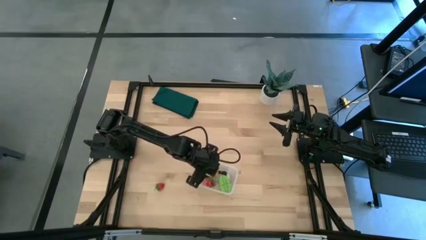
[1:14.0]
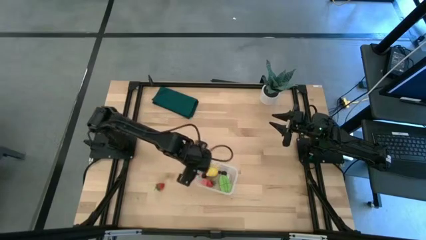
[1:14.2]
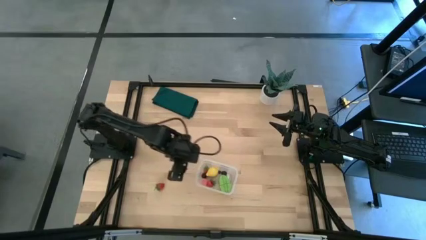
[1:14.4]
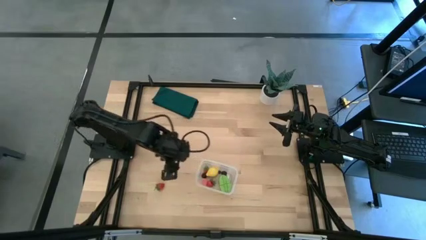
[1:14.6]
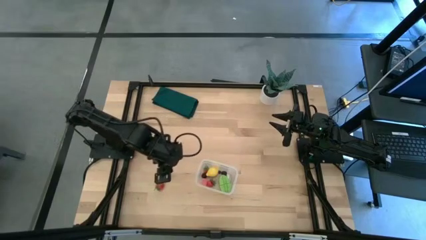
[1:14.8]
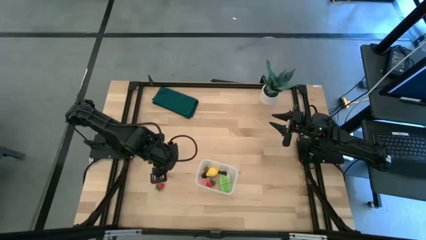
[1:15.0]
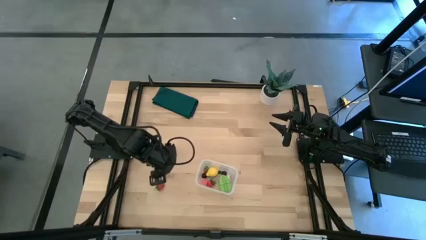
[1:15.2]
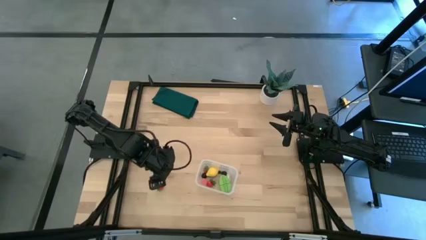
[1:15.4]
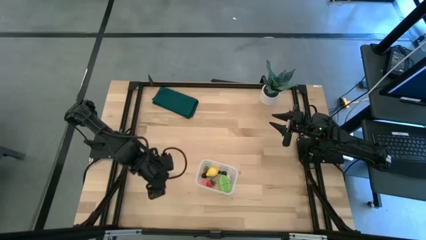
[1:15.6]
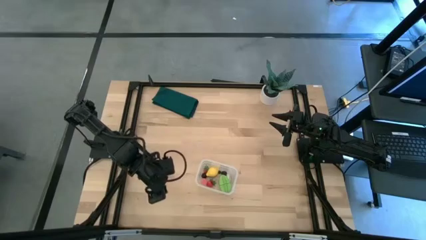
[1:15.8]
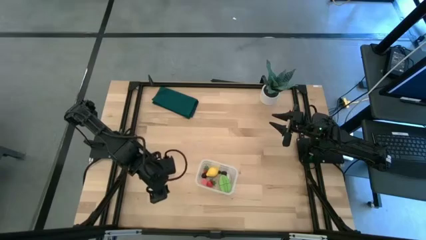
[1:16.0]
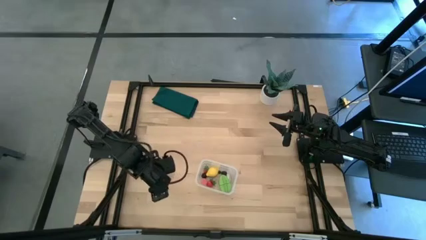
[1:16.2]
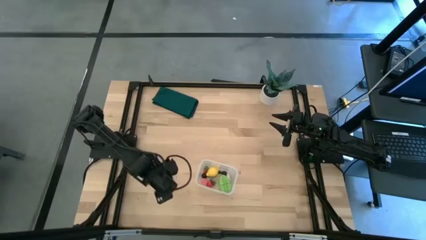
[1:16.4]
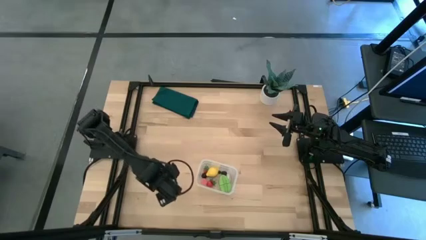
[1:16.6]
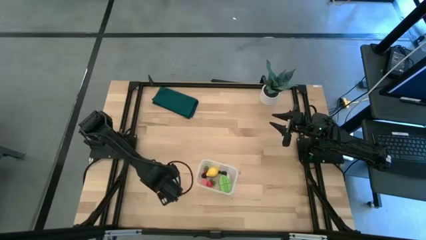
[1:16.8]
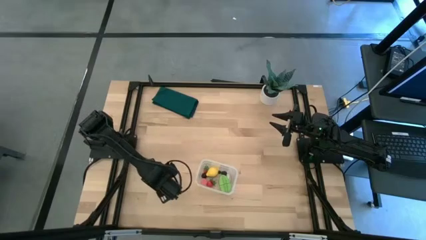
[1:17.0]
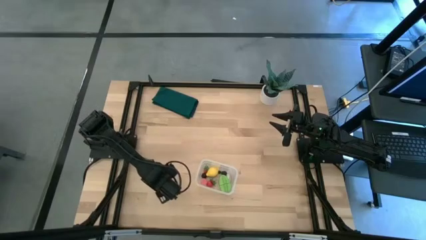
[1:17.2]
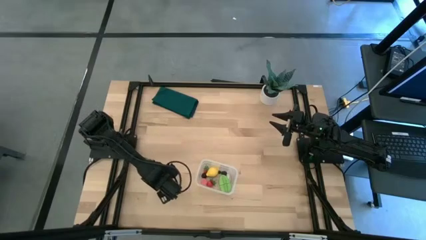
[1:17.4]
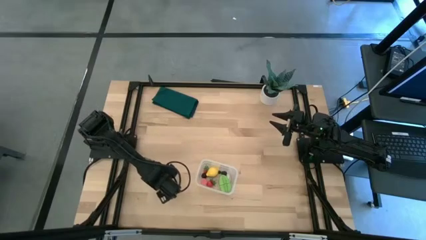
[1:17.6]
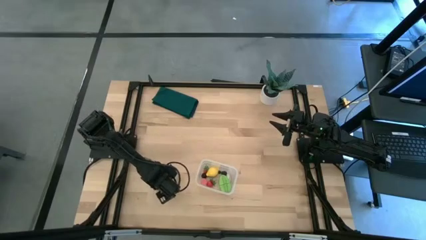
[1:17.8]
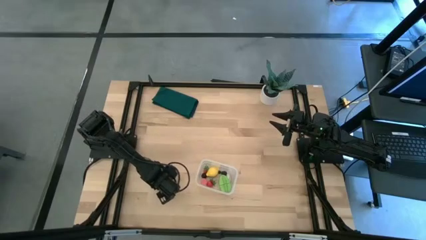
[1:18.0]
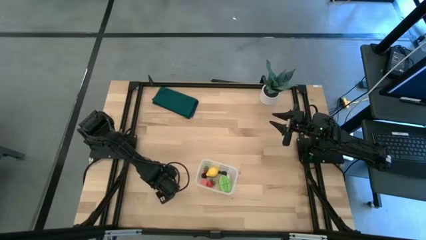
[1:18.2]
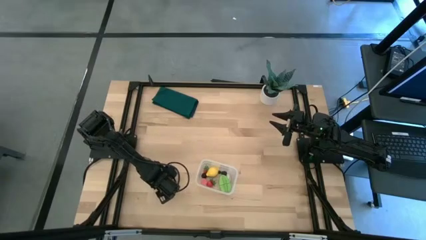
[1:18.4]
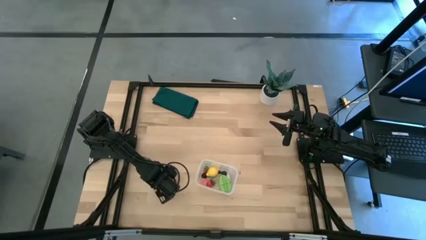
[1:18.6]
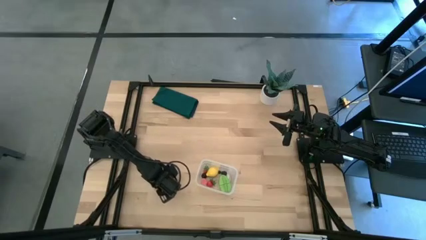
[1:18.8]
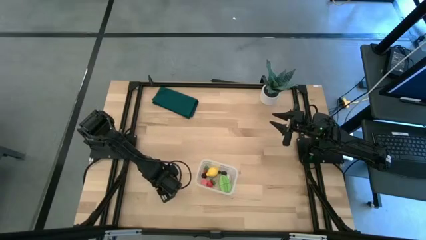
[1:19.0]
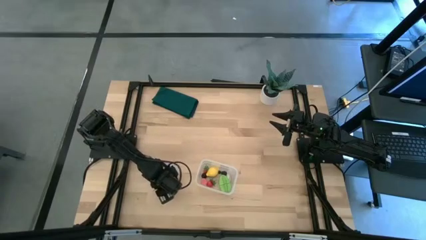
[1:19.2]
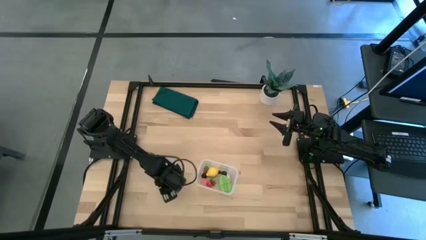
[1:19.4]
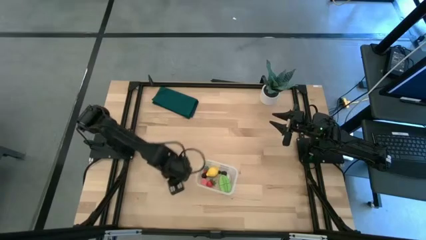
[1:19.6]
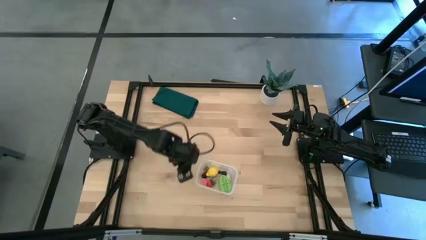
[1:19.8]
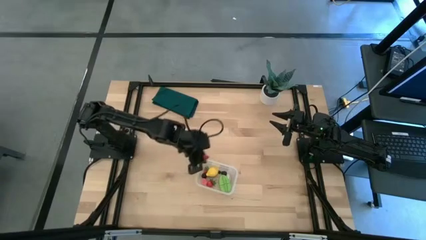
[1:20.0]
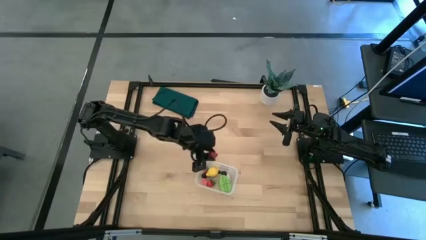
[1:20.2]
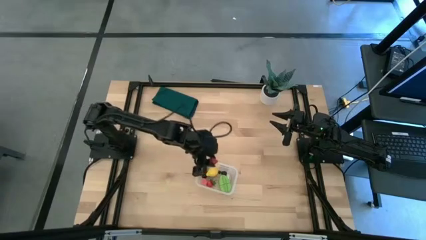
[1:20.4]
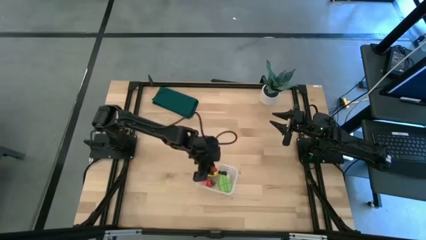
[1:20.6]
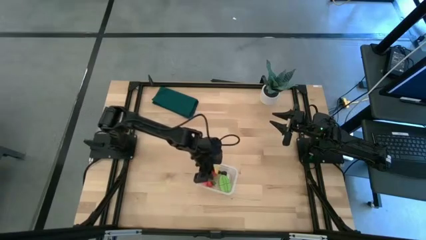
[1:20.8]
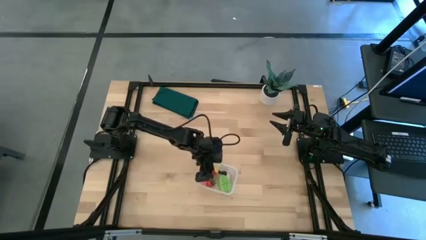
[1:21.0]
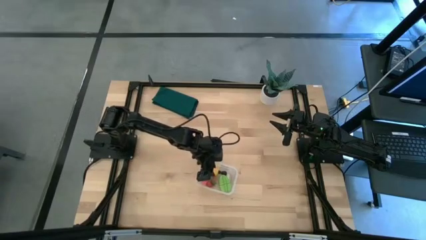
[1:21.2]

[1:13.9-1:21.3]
Task: Pick and placing Produce into tupperware
Put the strawberry into the transparent bin

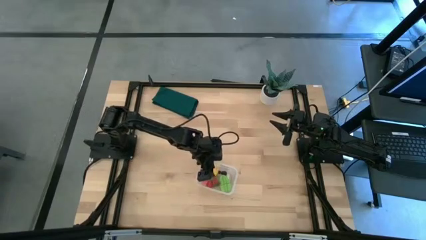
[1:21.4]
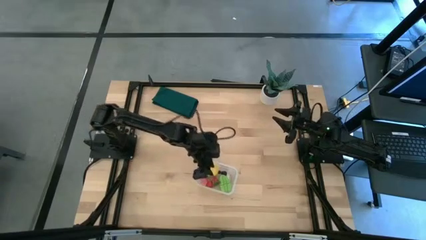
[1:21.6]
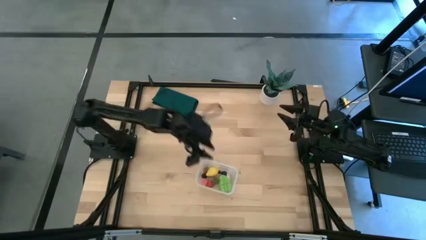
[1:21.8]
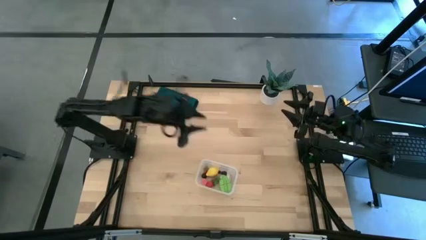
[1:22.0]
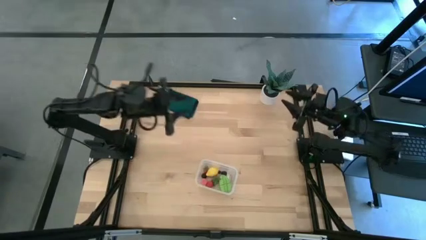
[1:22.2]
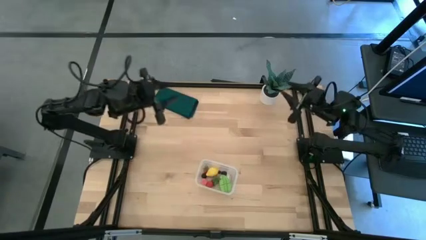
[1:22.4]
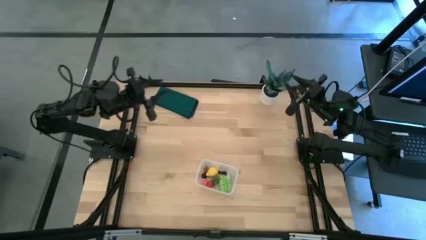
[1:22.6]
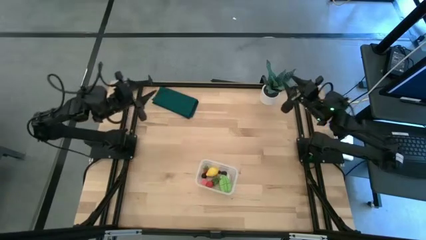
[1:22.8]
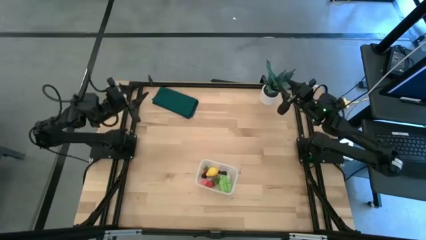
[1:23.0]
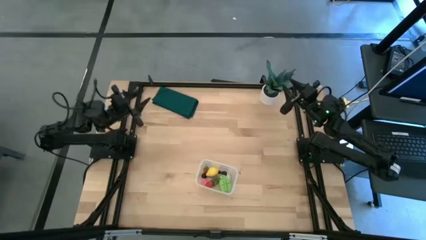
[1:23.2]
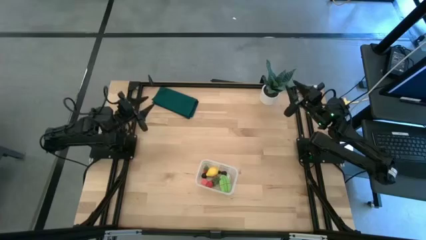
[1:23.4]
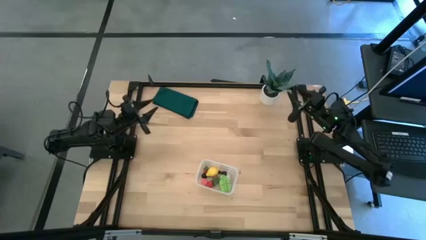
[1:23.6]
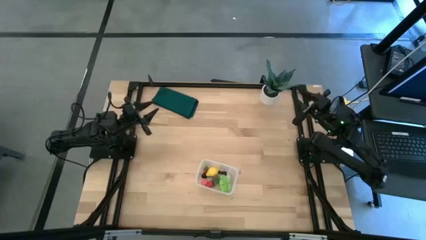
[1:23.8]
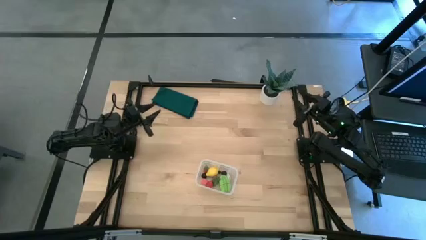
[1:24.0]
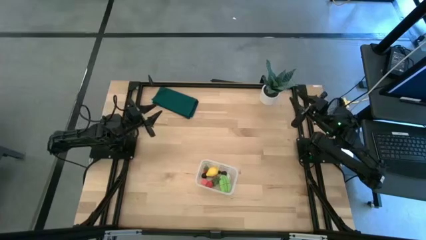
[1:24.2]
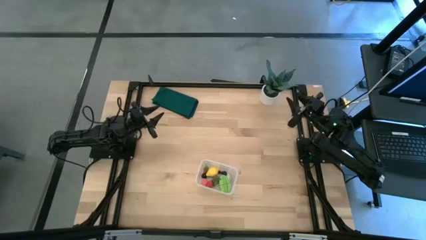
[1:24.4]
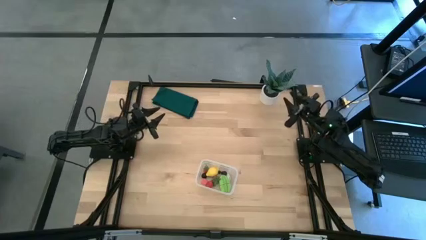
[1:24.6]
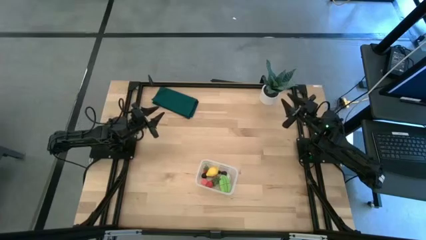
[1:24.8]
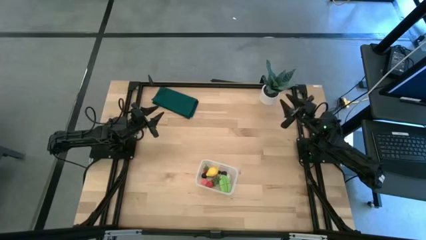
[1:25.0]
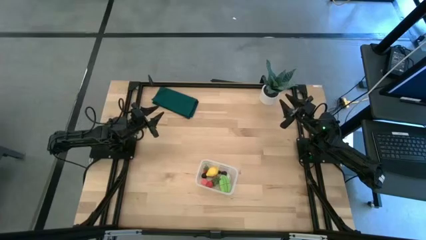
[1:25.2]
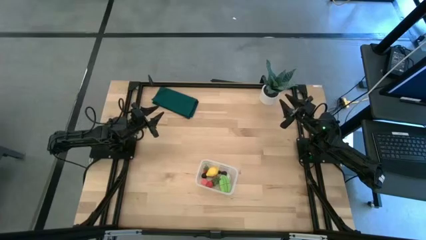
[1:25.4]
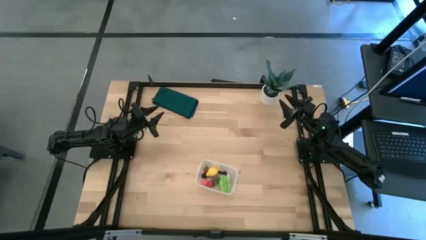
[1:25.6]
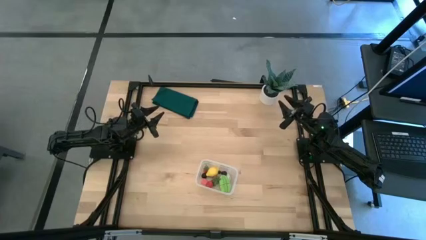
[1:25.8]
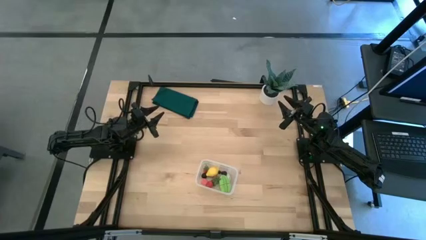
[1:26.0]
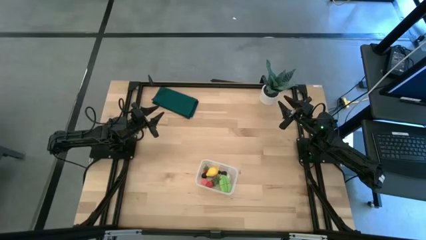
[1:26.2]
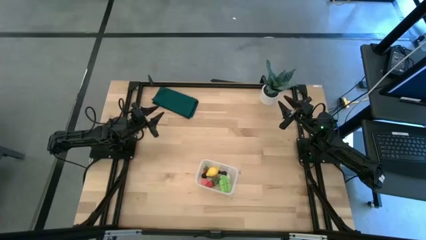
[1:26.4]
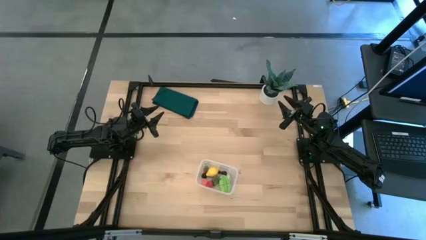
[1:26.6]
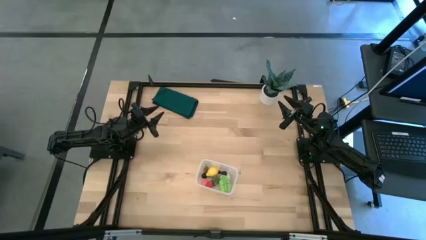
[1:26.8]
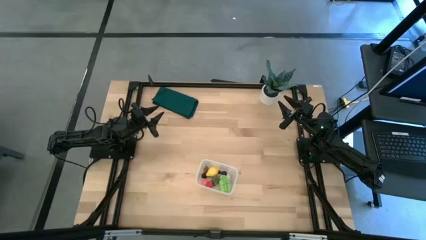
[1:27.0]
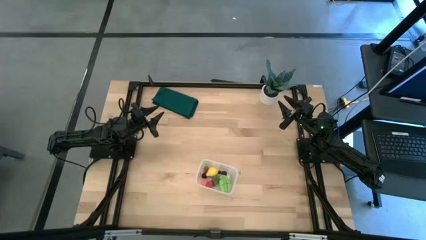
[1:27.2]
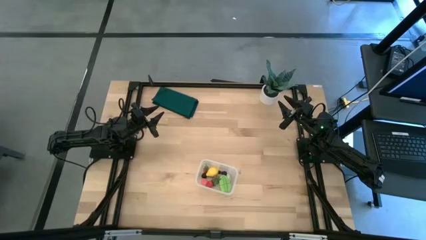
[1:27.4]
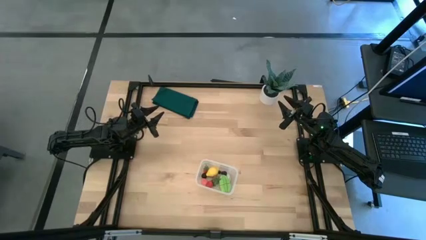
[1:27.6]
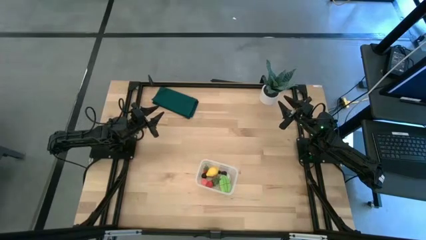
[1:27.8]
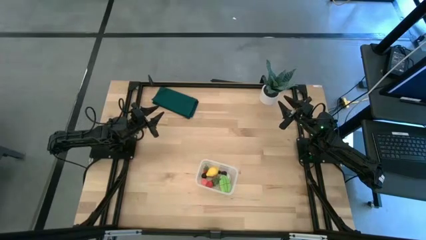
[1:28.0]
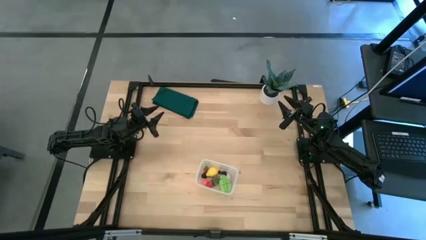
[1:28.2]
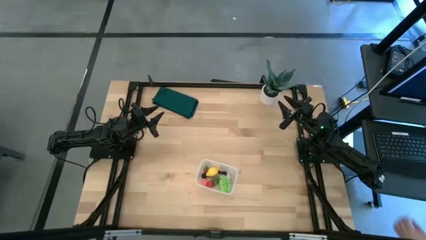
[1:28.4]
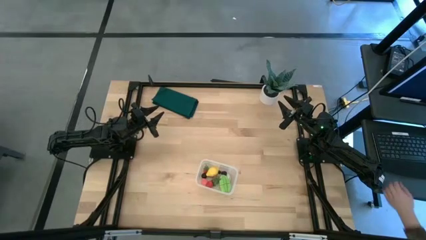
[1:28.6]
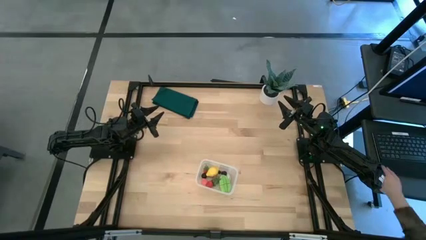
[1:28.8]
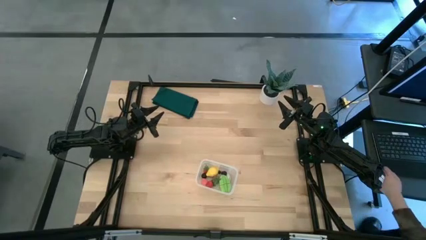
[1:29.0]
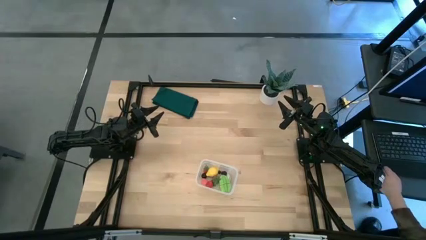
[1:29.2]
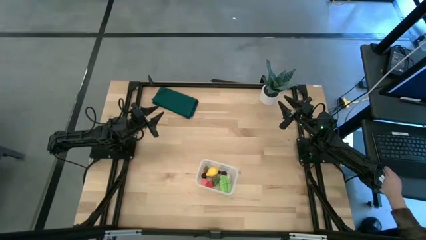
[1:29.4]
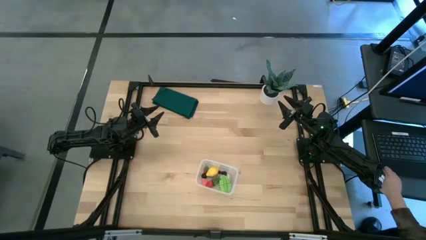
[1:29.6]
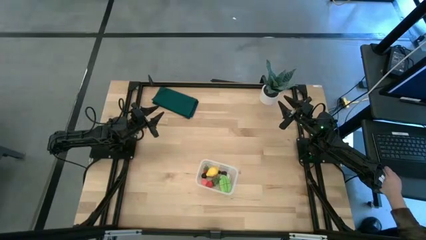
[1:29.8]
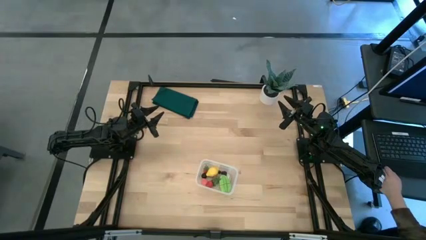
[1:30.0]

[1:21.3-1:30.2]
Return to Home Position

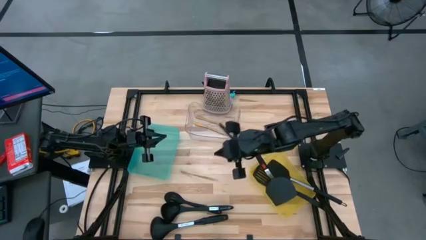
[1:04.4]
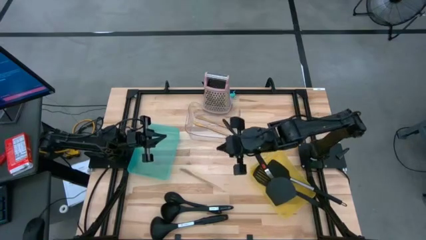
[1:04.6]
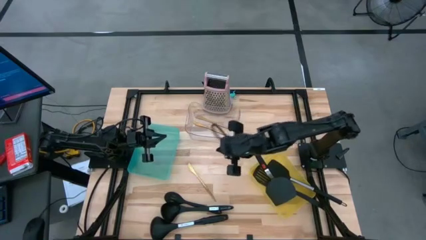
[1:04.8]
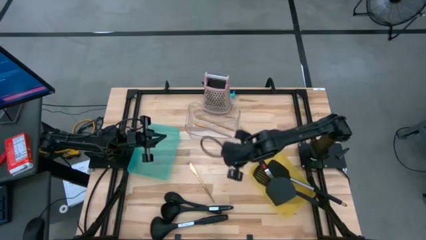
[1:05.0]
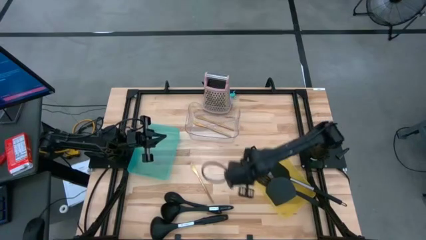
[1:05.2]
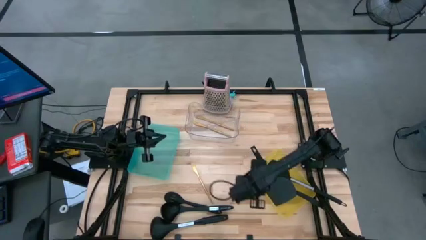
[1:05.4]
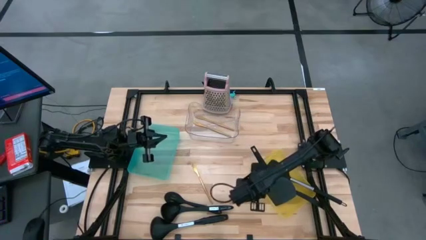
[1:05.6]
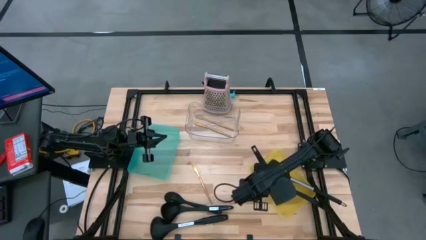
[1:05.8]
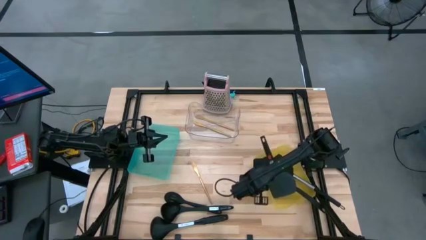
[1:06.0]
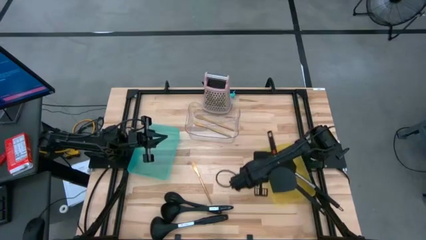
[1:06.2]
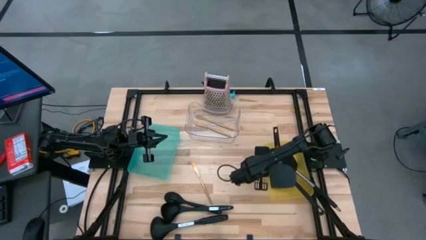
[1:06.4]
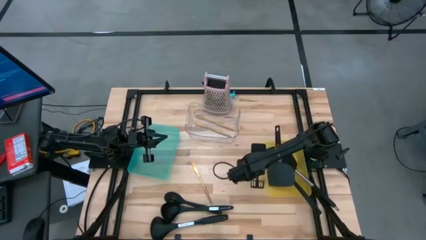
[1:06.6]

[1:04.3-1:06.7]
Task: Pick & Place Kitchen Items
Adjust the yellow bin on the table
